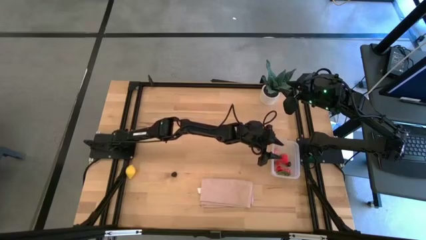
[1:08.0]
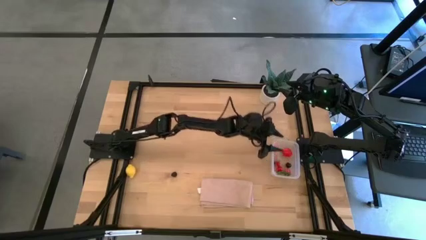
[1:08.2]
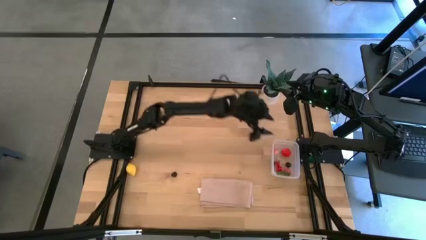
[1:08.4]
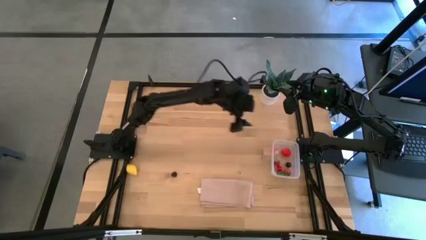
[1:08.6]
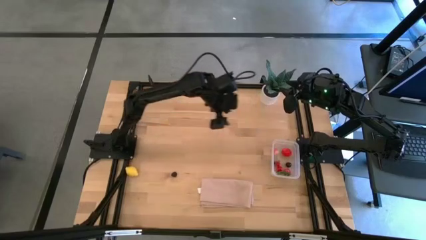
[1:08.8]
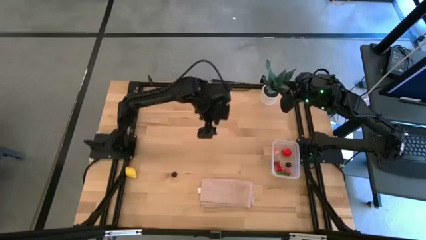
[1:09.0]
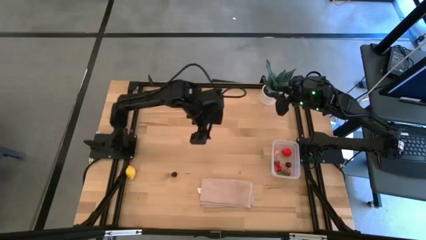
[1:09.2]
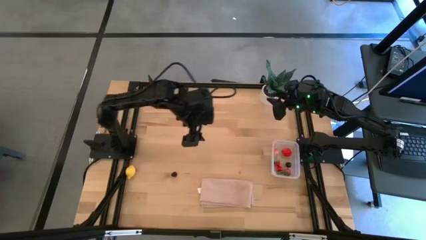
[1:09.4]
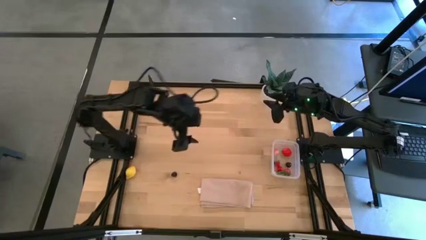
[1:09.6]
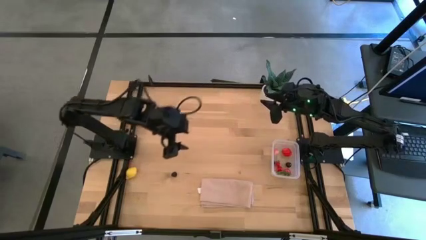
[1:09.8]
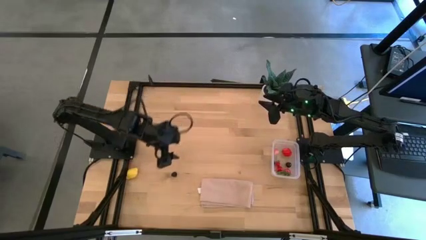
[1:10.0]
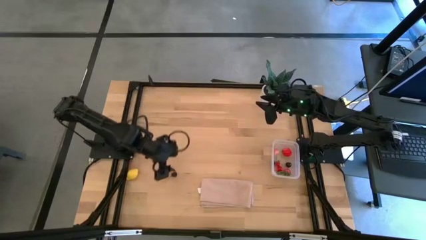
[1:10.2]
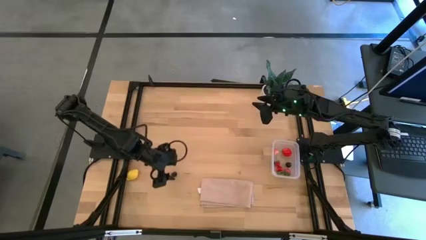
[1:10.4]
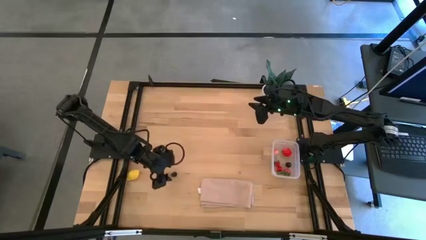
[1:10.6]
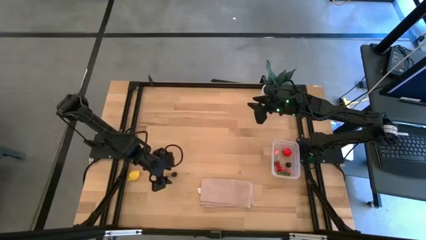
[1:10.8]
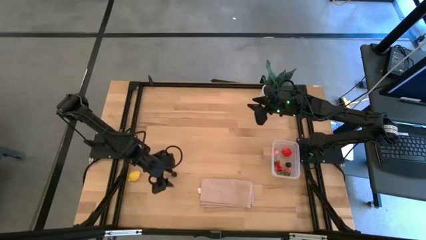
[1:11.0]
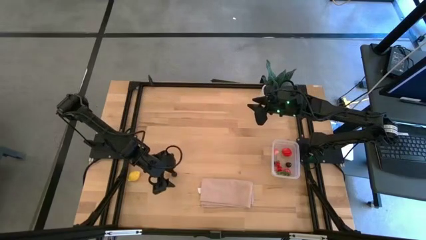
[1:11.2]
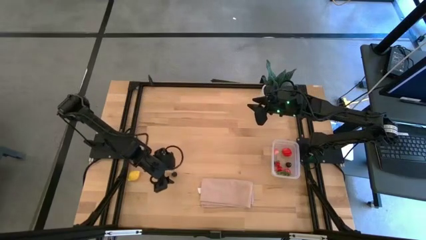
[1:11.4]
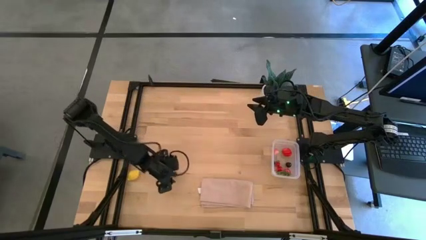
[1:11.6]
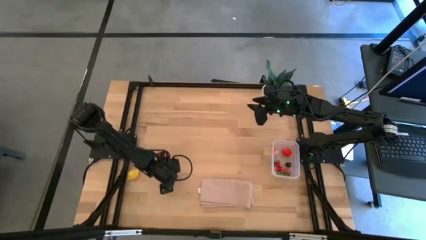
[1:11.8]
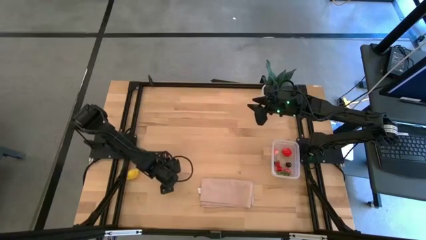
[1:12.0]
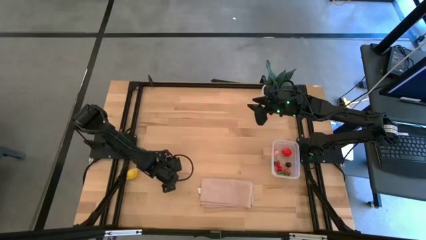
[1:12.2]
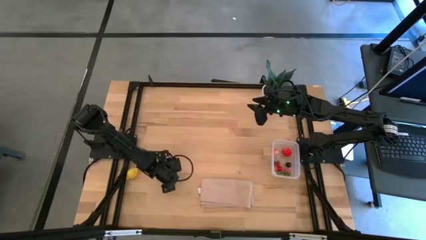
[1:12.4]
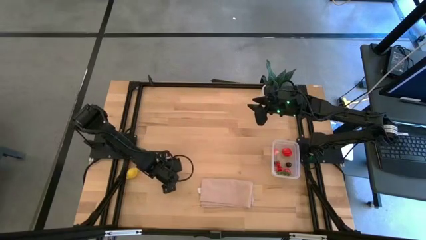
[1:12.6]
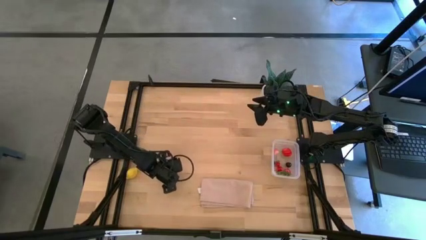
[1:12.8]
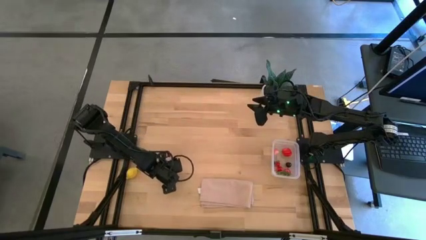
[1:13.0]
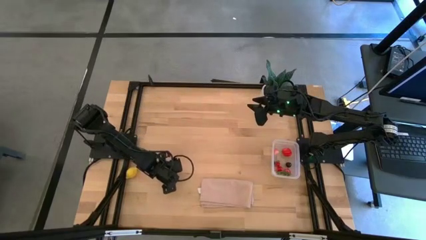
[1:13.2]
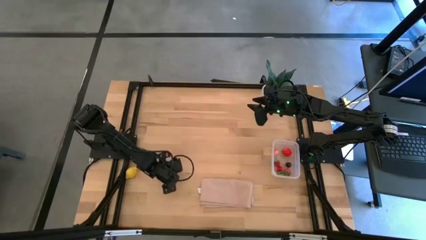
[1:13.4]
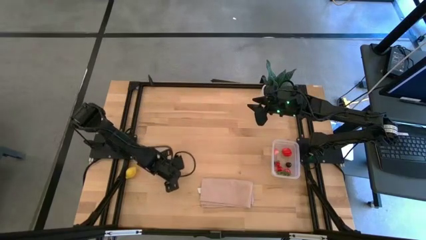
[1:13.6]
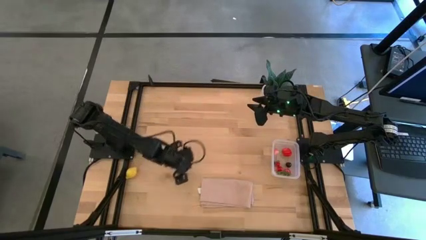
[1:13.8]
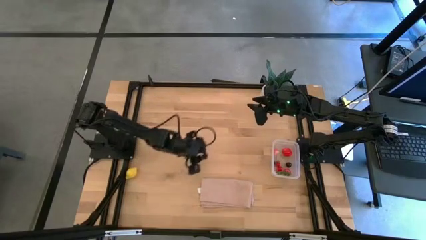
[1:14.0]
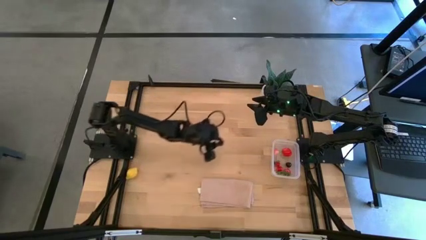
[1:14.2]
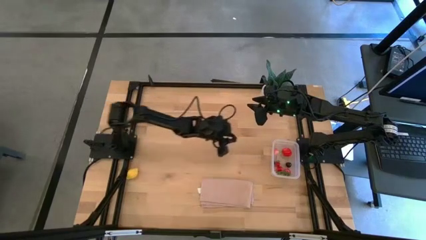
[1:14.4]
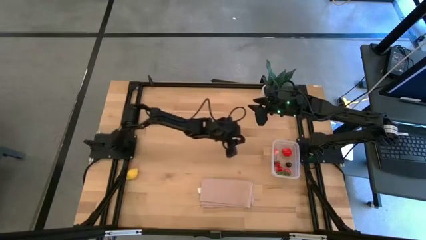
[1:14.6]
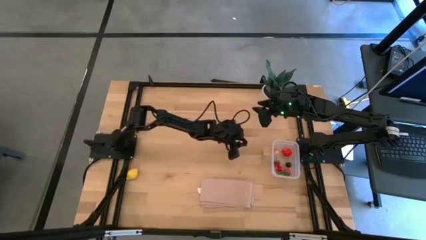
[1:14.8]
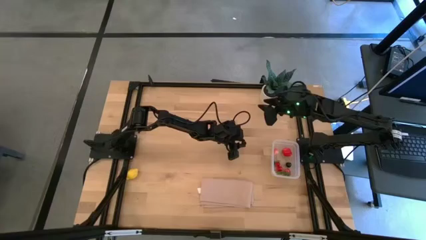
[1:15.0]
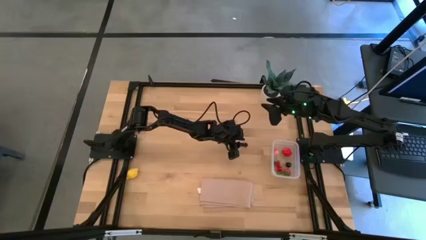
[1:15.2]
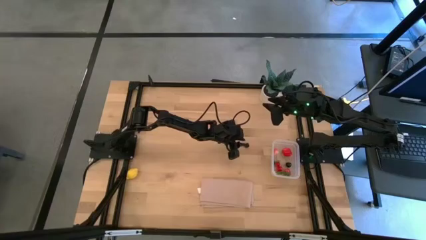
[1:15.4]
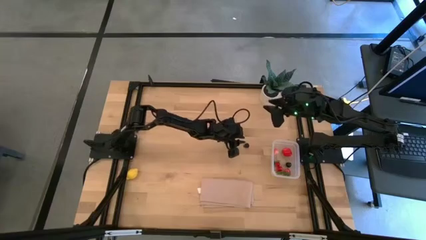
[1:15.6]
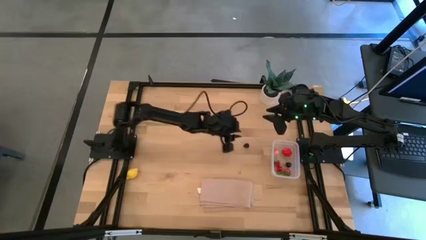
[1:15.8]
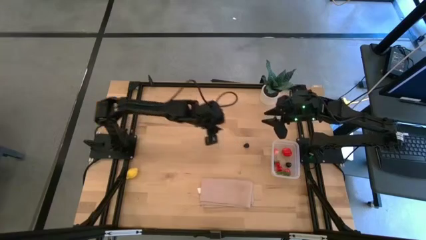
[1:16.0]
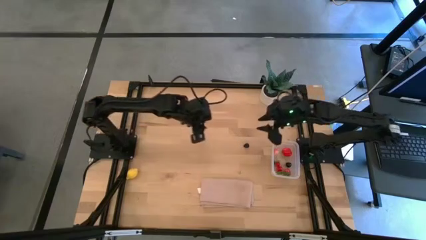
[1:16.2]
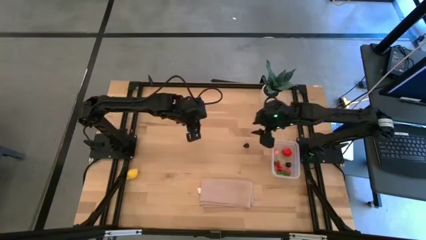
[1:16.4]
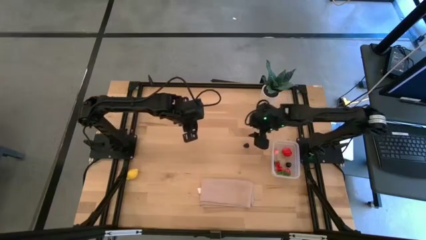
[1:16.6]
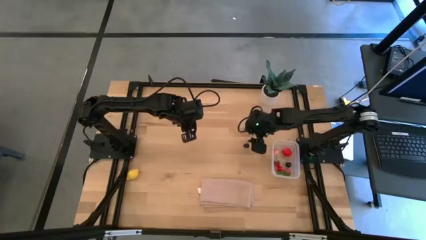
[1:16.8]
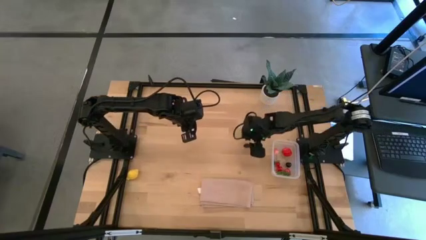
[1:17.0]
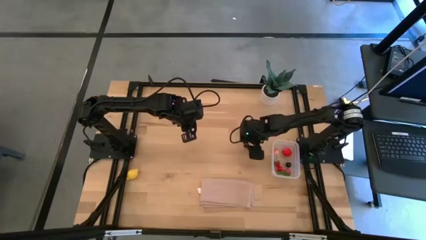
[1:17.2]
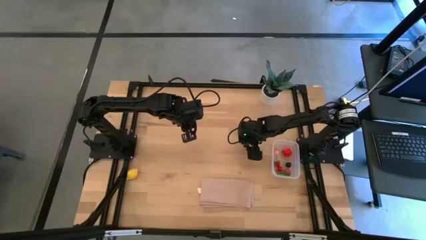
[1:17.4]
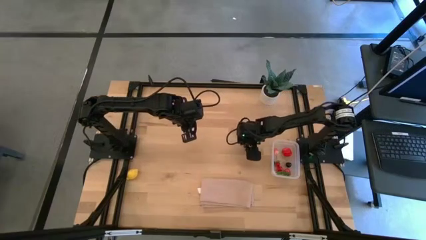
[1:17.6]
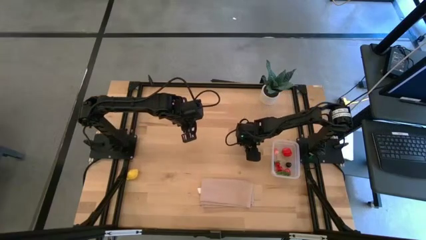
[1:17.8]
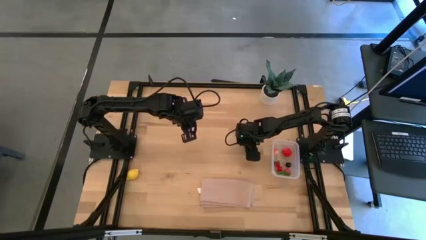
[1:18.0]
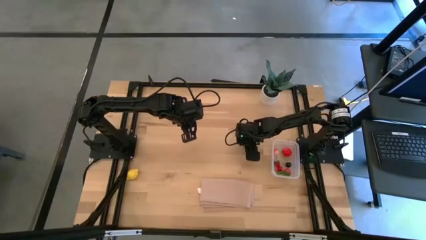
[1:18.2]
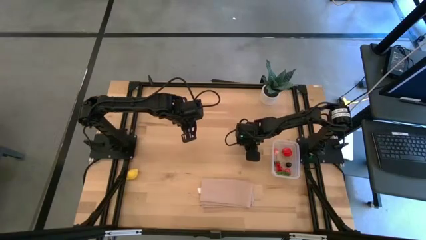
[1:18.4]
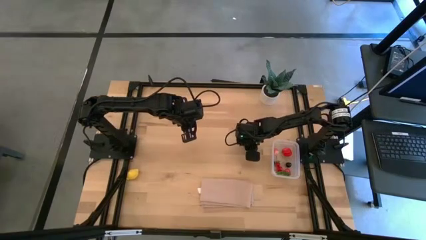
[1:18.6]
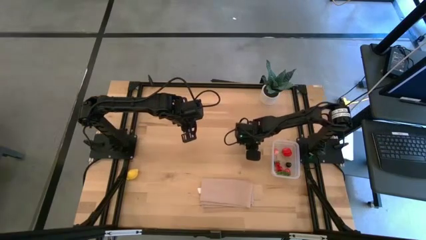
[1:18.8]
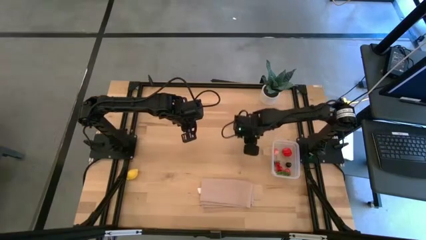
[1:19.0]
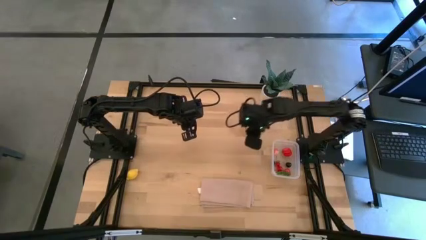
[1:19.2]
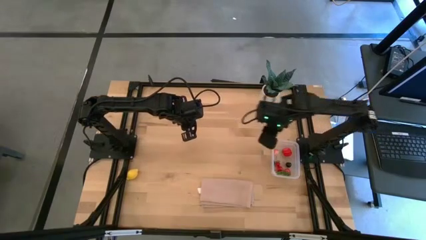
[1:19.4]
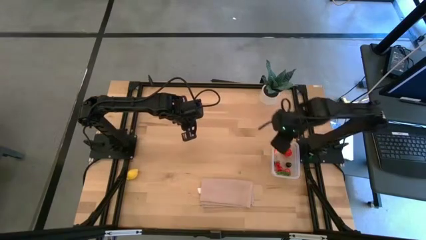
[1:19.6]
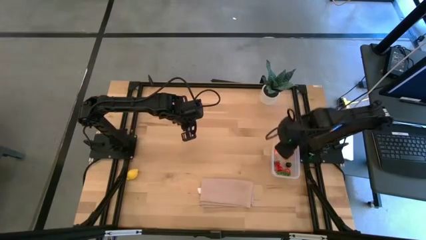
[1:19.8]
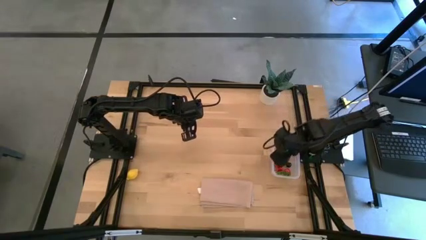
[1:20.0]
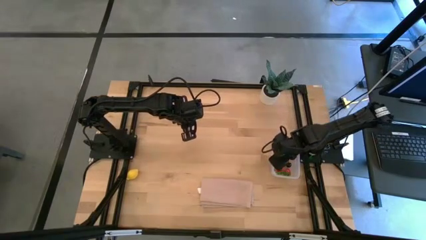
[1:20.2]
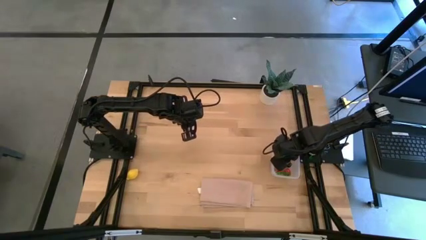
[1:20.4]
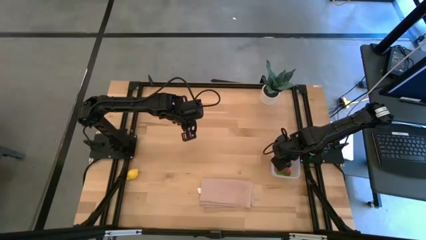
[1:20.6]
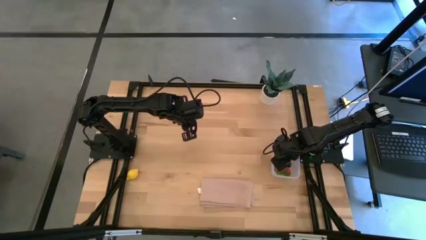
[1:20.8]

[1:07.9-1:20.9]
Task: Pick and placing Produce into tupperware
Put the blackberry into the transparent bin

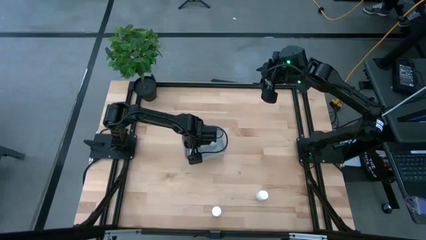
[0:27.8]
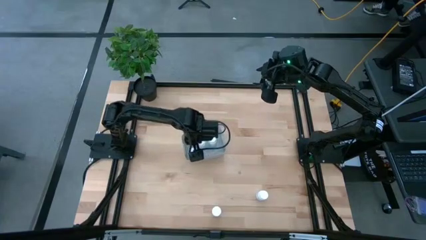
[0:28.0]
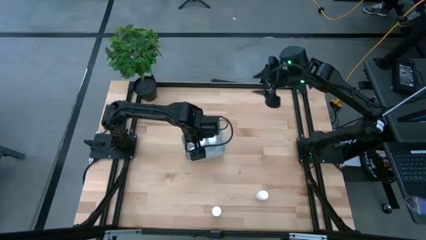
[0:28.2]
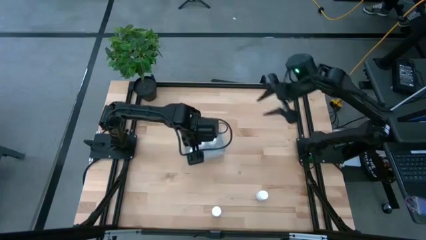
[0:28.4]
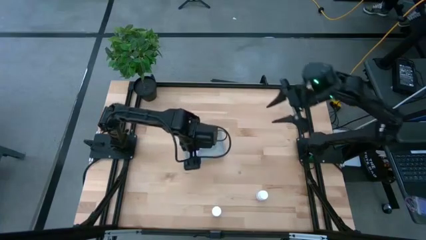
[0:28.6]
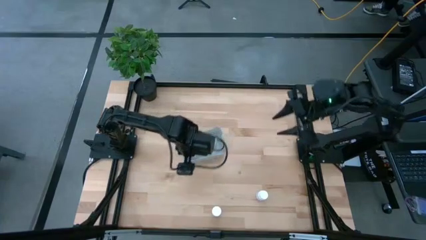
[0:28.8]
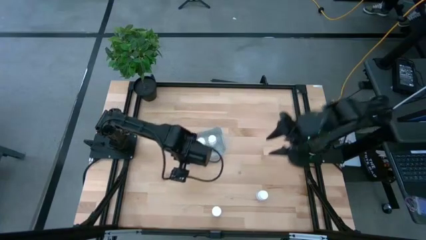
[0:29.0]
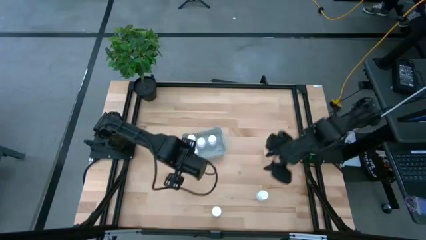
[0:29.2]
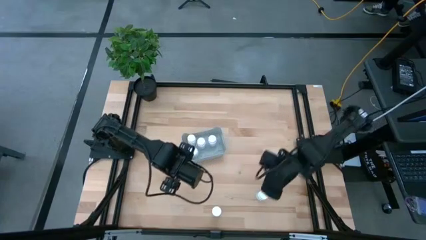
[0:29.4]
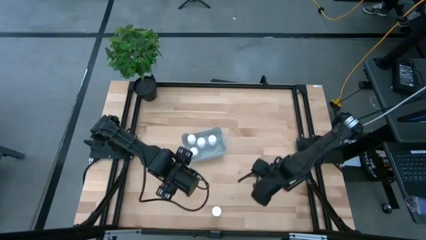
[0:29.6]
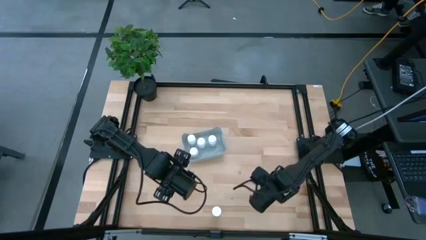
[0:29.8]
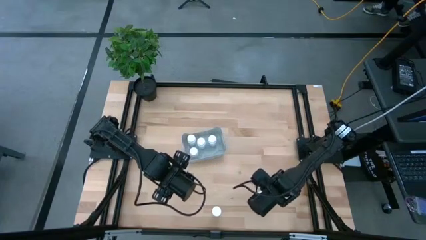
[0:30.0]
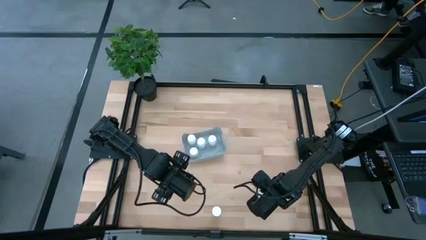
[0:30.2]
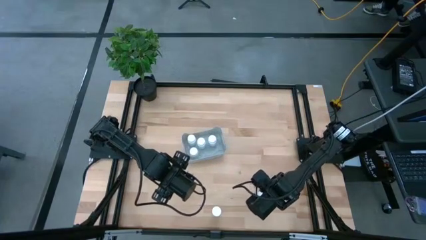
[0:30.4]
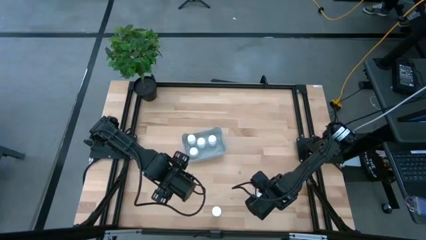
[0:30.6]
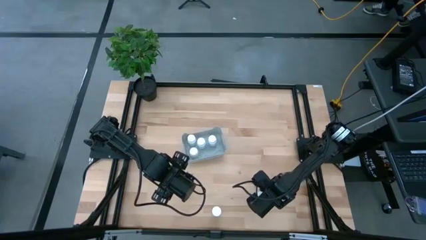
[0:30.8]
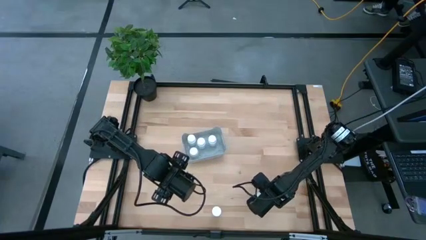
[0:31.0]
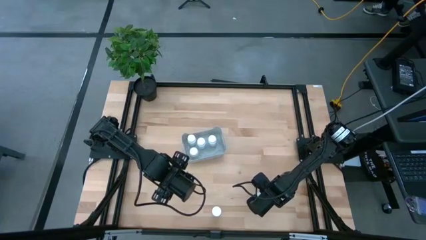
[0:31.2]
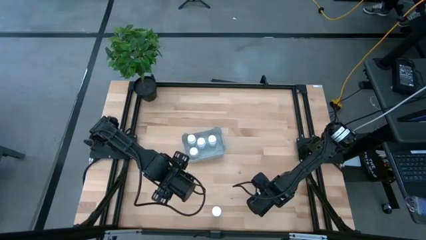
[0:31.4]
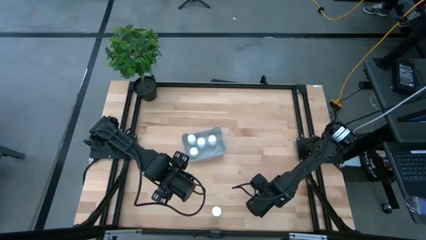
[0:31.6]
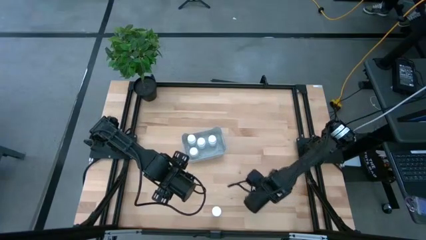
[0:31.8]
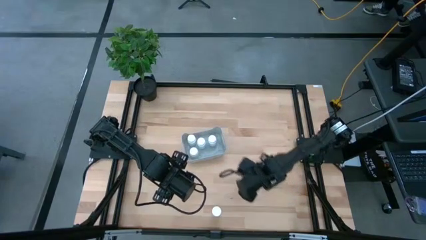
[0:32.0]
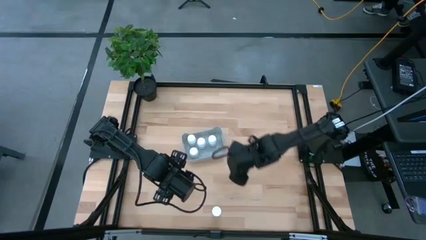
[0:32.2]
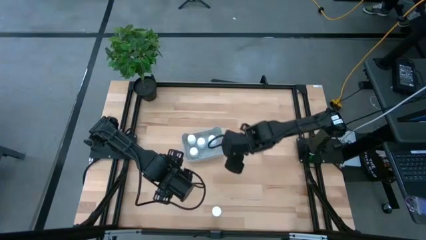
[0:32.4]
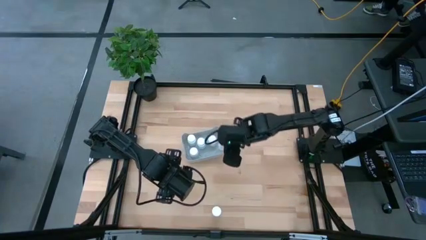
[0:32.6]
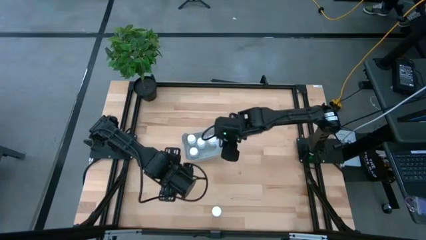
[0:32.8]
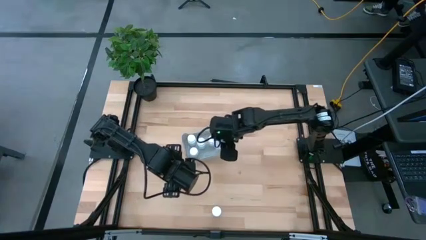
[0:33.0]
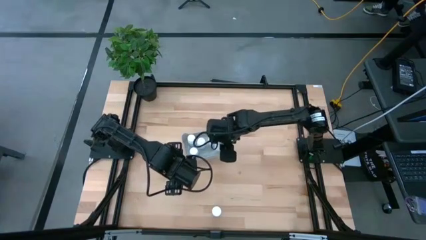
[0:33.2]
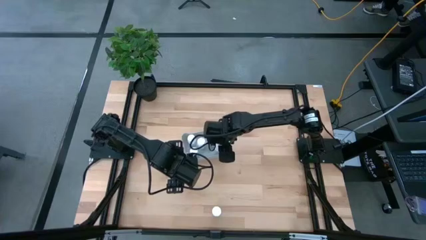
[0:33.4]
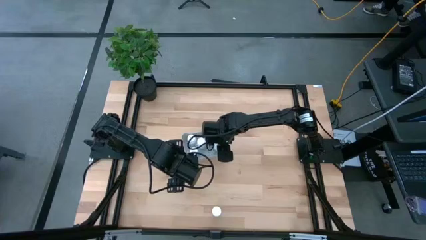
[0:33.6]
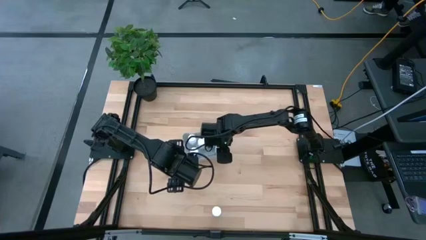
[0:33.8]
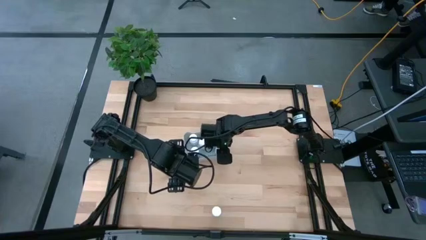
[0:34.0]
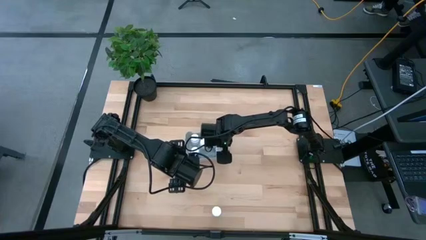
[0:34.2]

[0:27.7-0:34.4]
Task: Pick and place pill bottles into a basket
Put the white pill bottle into the gray basket
